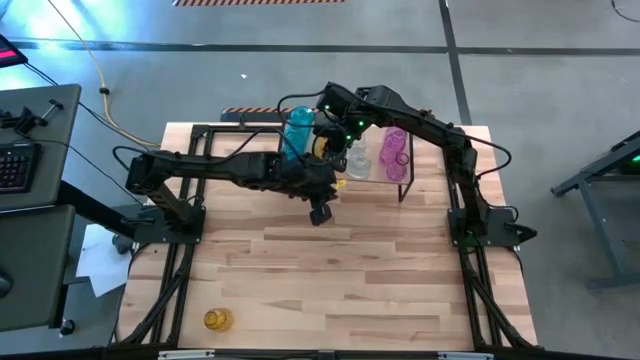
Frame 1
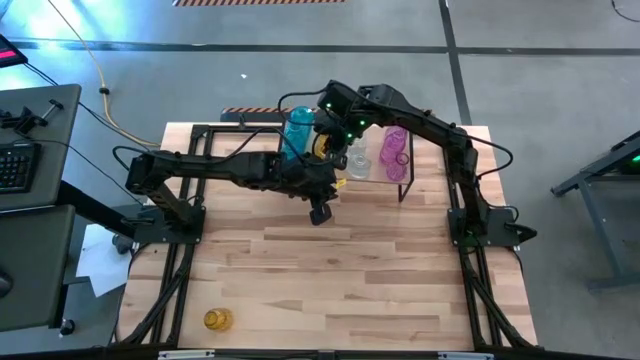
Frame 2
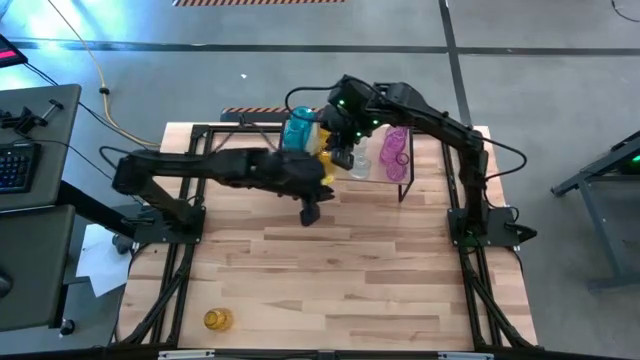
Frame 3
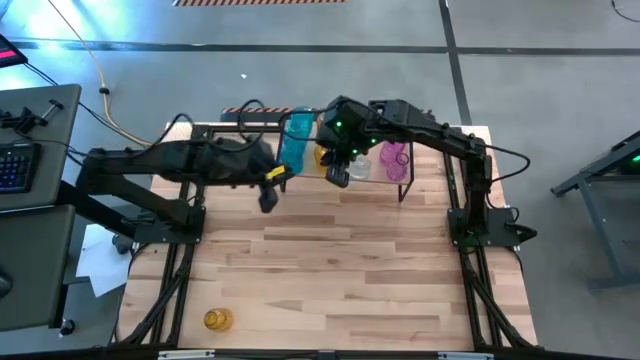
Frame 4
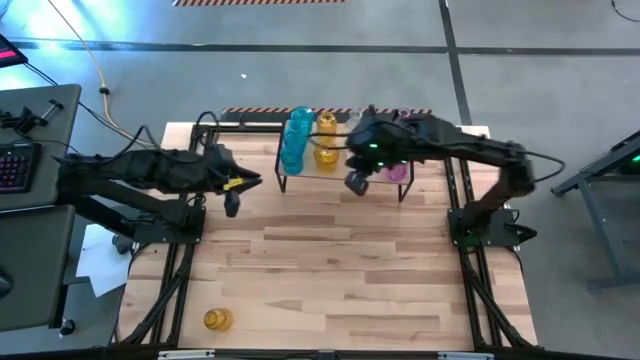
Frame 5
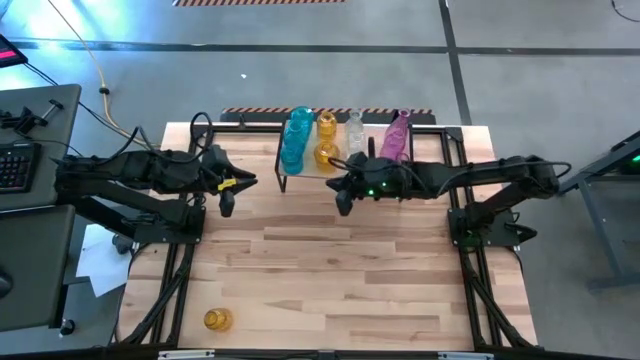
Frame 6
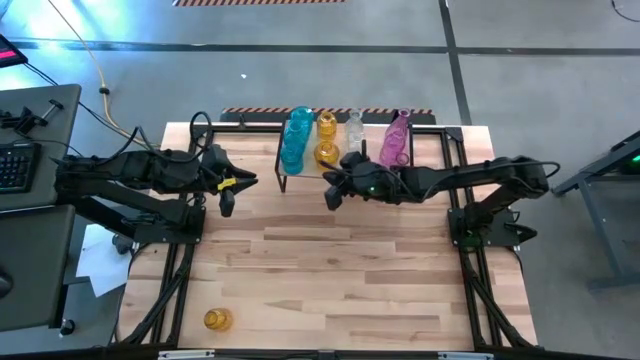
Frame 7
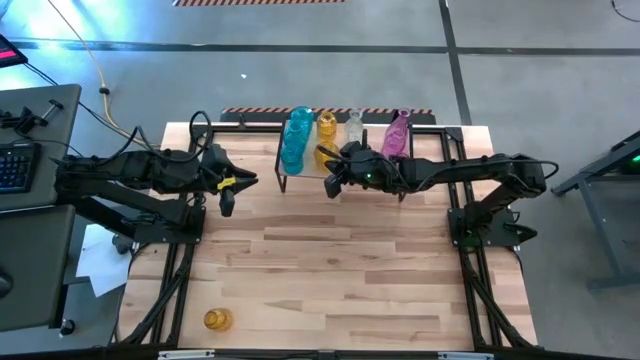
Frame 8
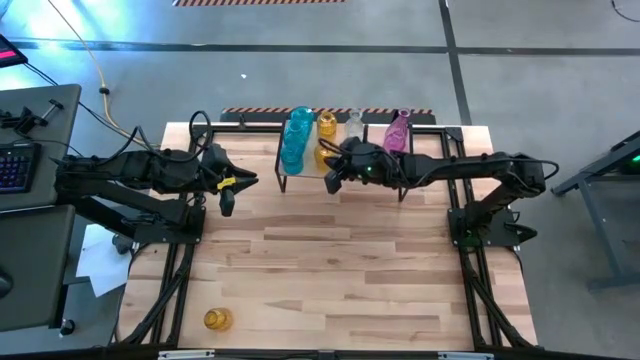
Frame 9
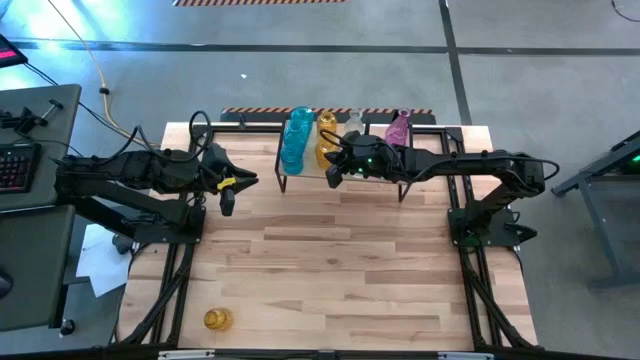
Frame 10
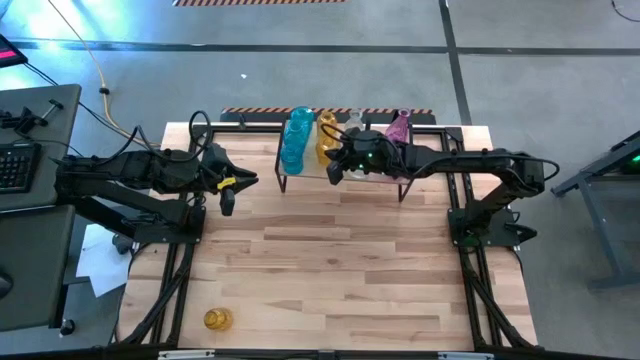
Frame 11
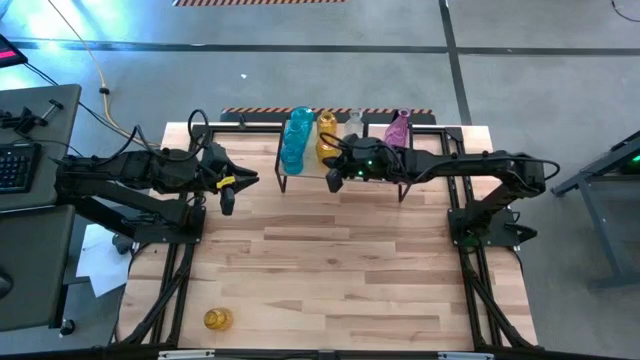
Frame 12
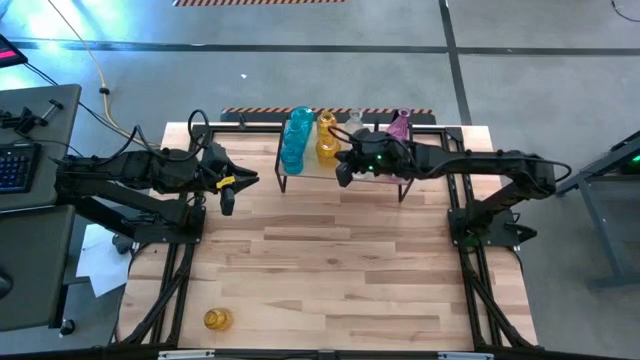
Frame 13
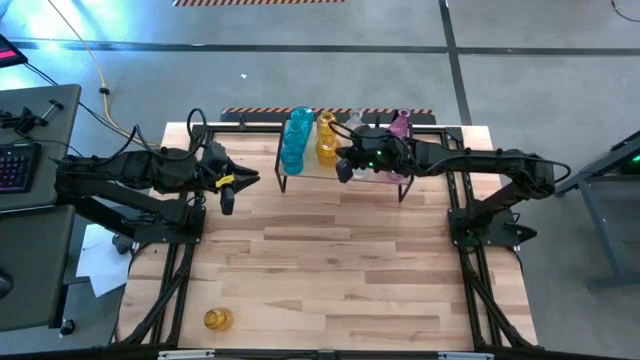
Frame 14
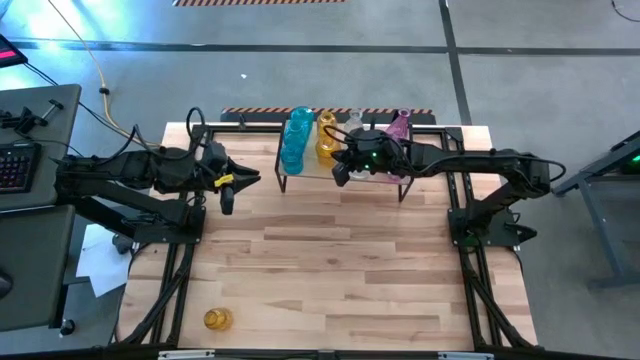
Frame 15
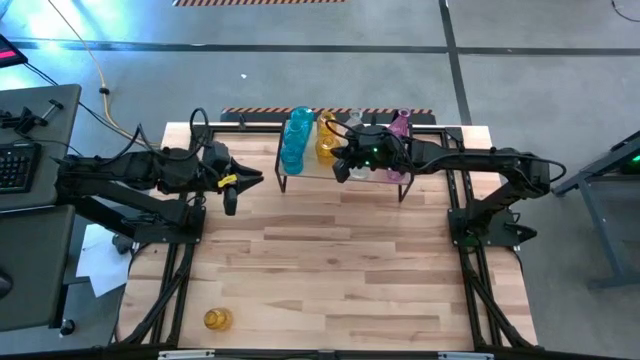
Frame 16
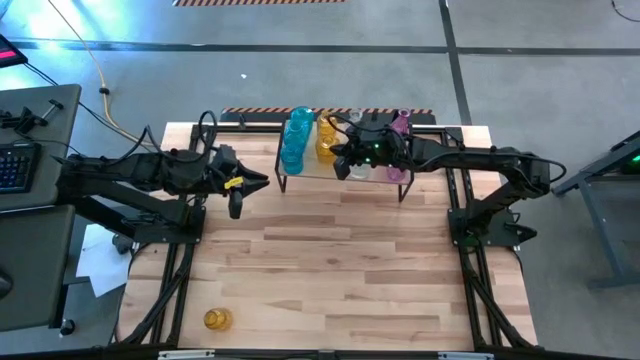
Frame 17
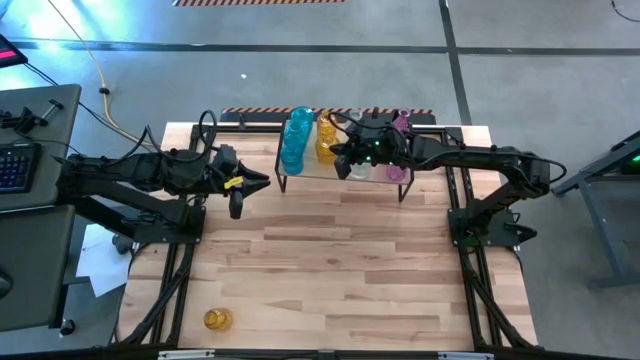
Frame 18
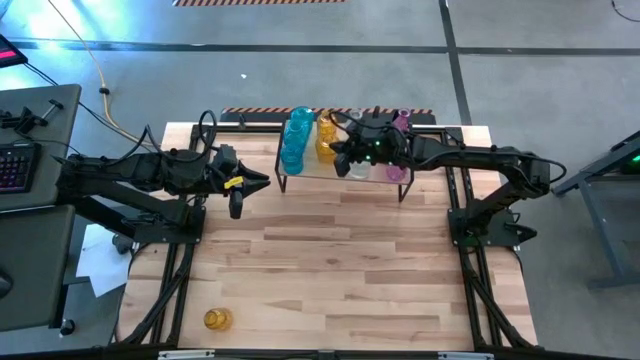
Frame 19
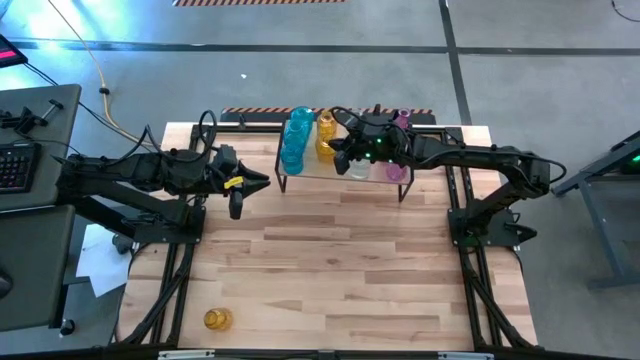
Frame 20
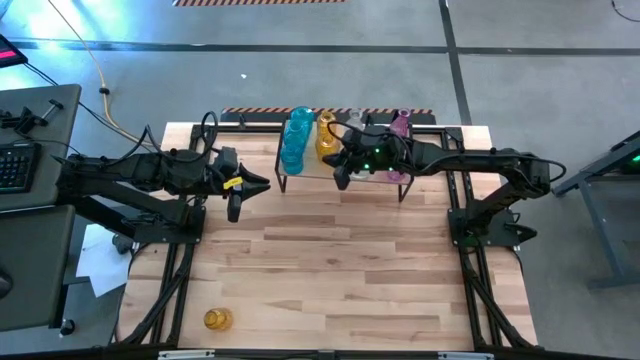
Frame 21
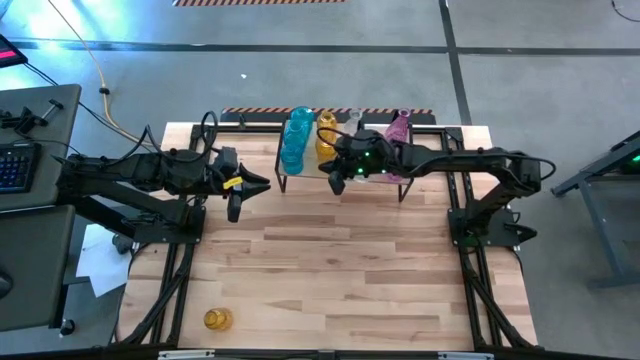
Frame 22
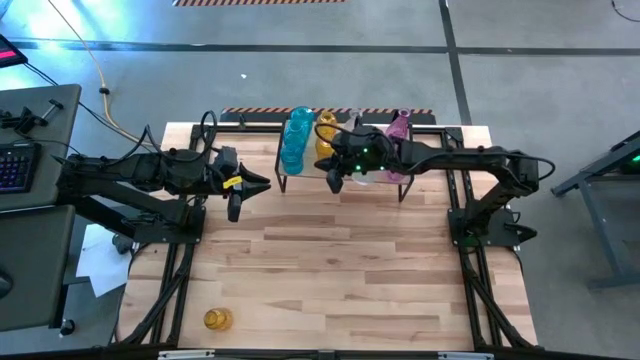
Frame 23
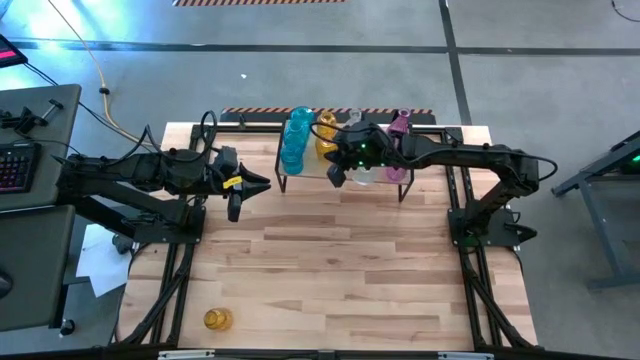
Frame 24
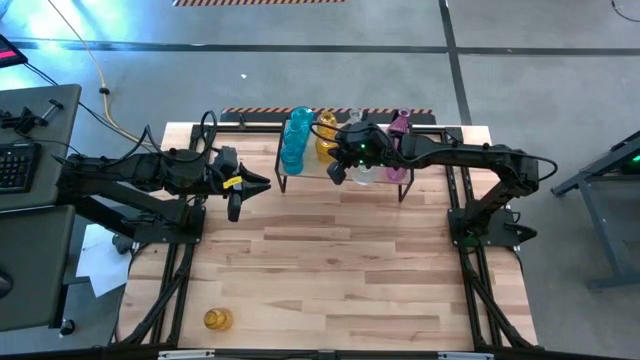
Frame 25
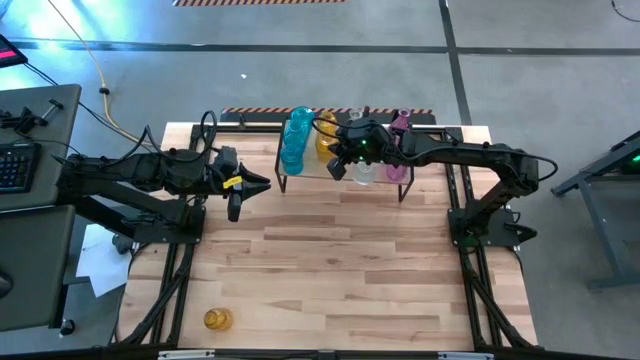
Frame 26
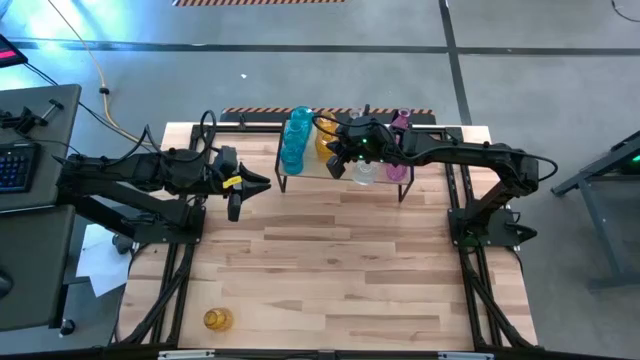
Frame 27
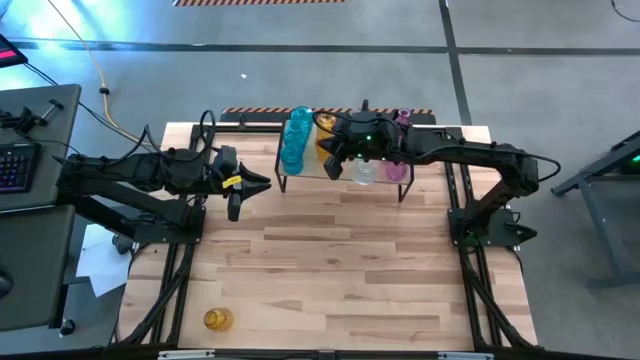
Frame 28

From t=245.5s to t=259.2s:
Task: sort vases onto shelf
Put the right yellow vase on the shelf aligned with the other yellow vase

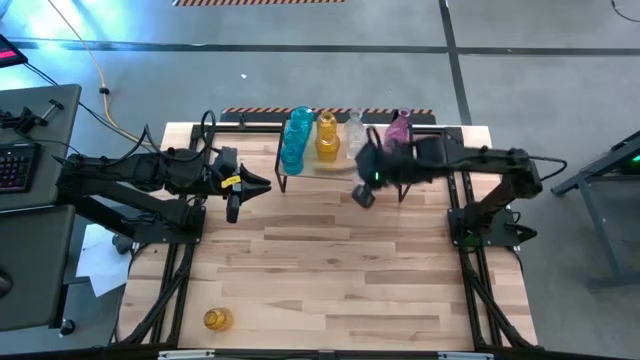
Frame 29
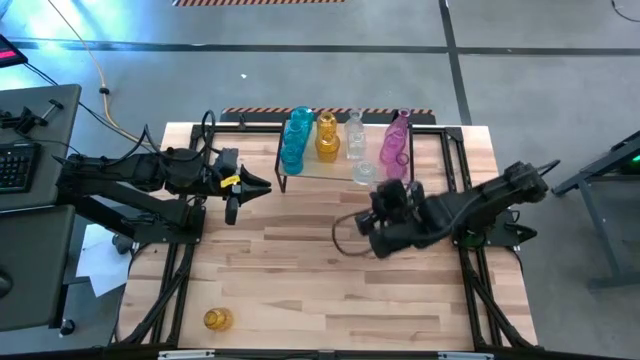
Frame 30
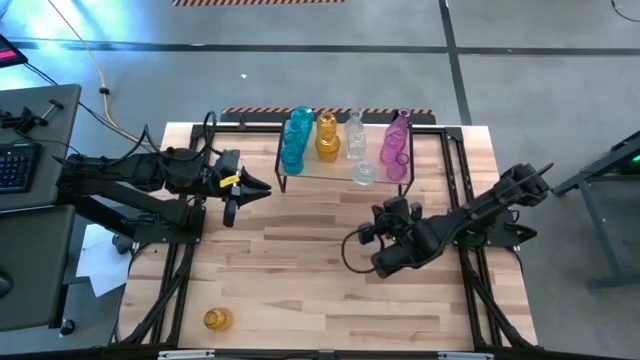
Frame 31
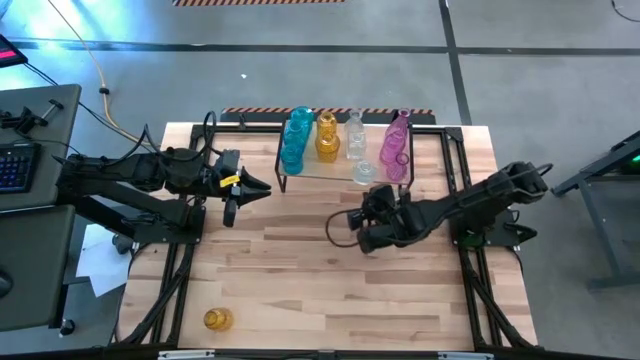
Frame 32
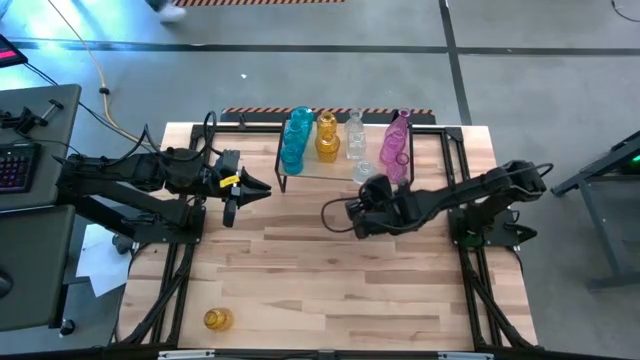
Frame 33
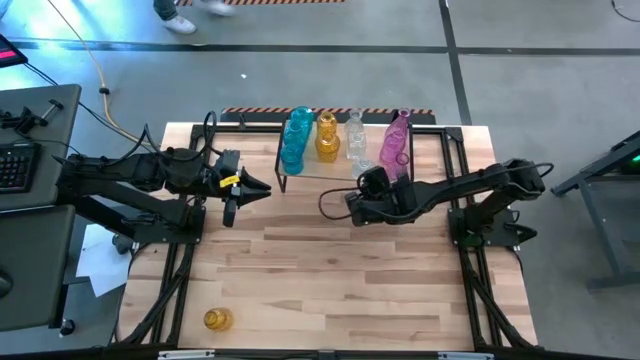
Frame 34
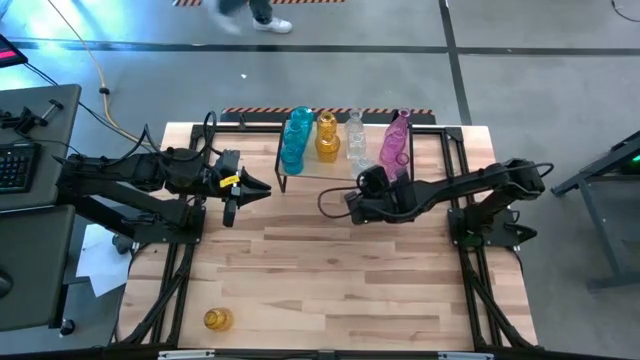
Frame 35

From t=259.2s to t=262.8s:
Adjust the transparent vase on the shelf

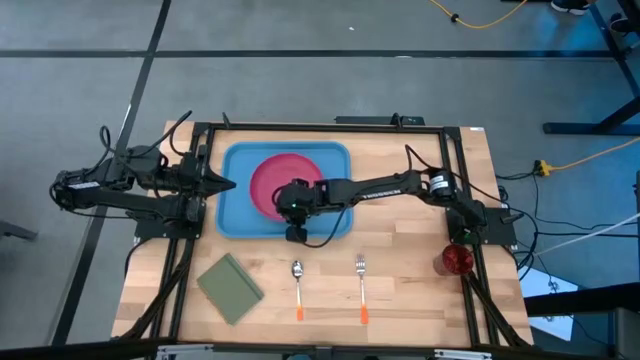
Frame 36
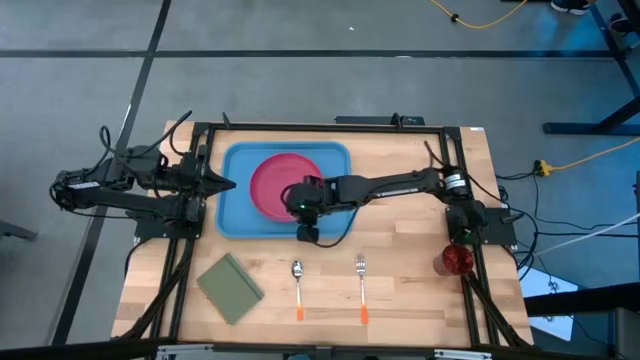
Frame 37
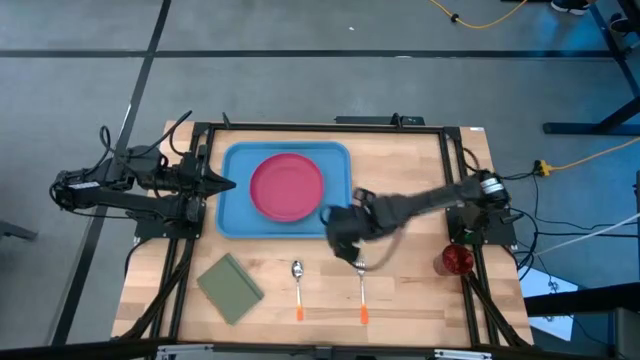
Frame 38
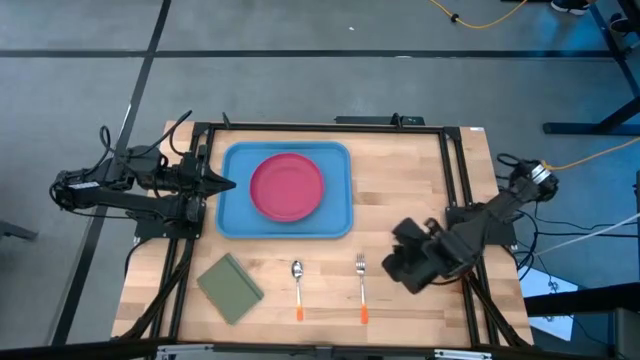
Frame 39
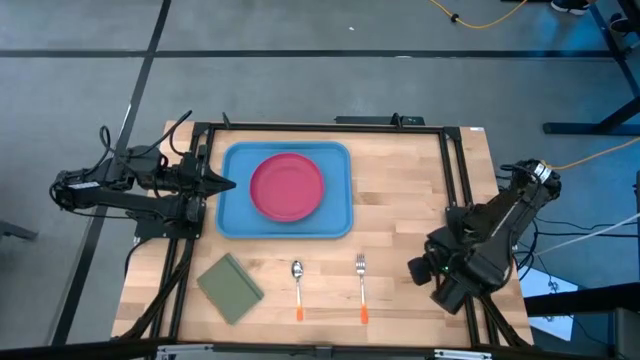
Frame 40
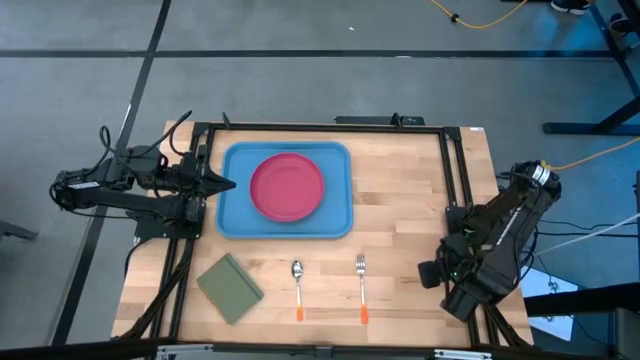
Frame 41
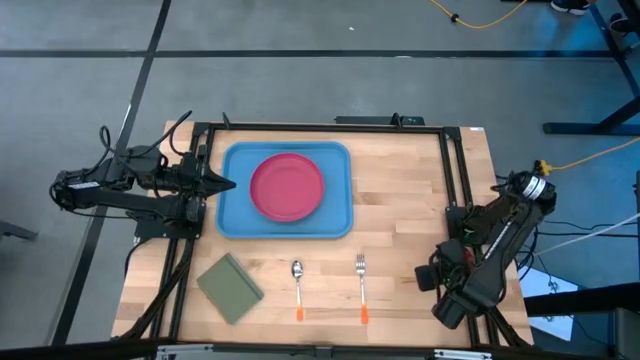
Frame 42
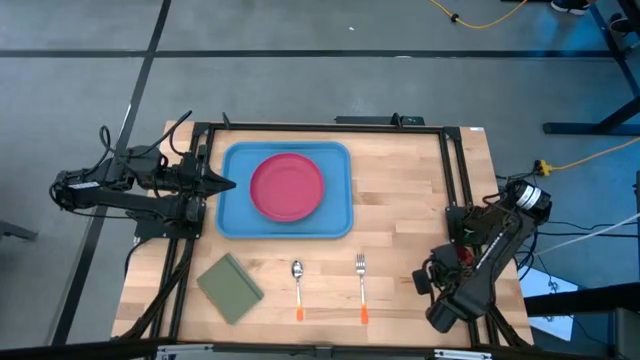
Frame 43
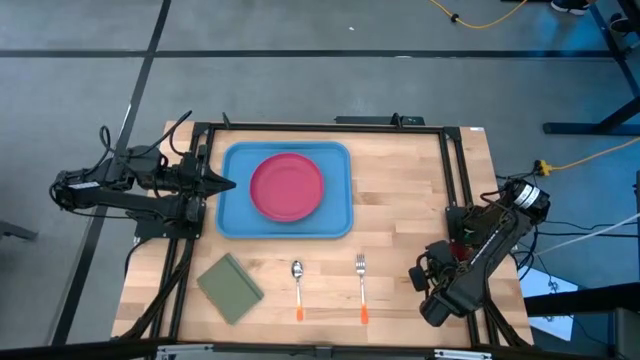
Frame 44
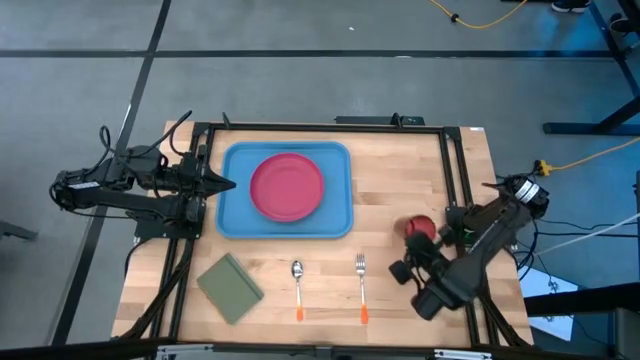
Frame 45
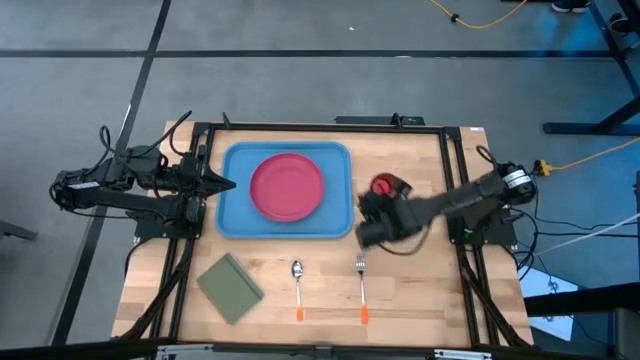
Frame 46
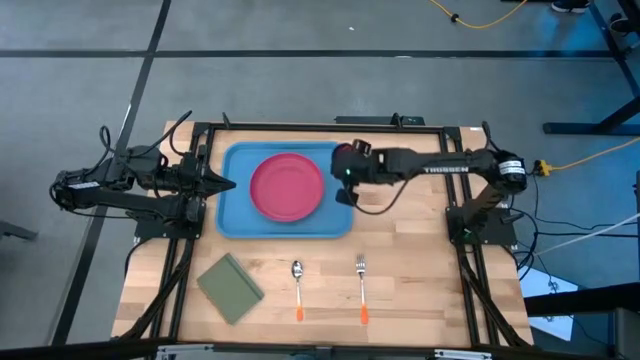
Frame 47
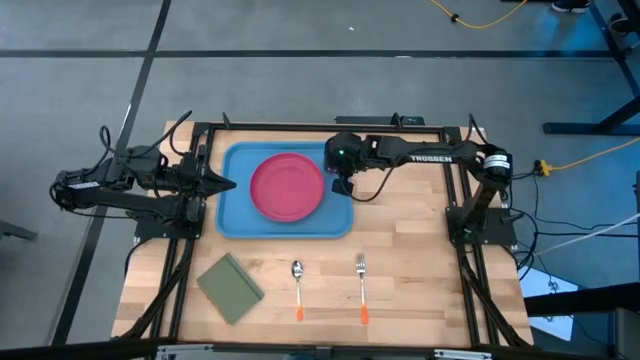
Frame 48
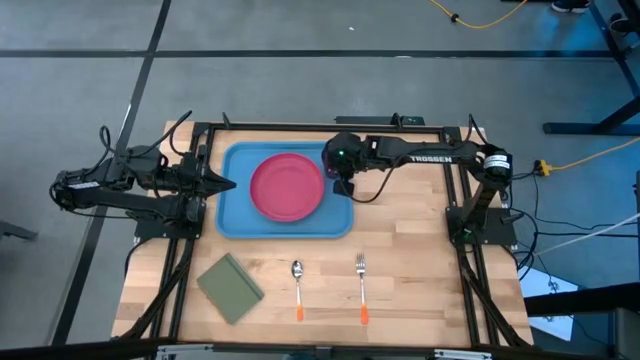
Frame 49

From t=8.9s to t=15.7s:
Task: Pick and place plate/cup/fork/spoon on tray
Put the red cup into the blue tray at the top right of the pink plate
